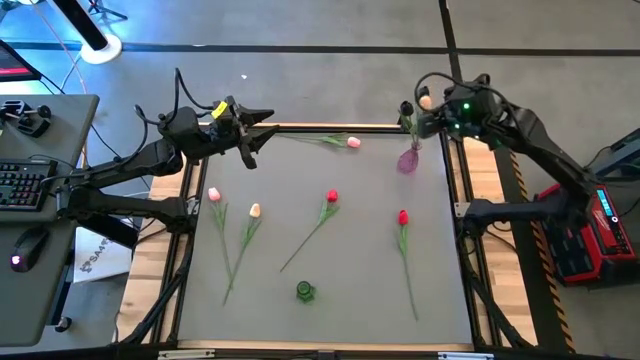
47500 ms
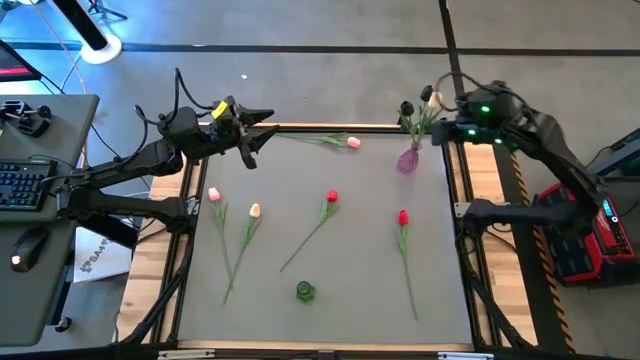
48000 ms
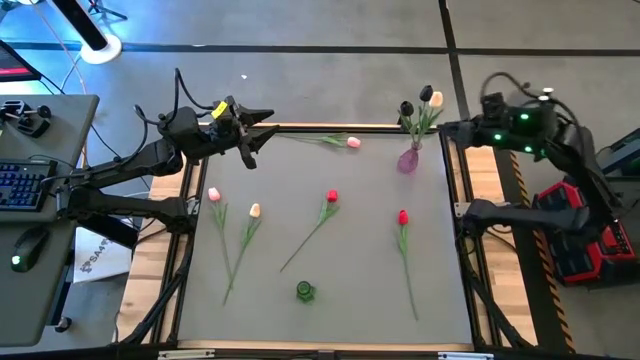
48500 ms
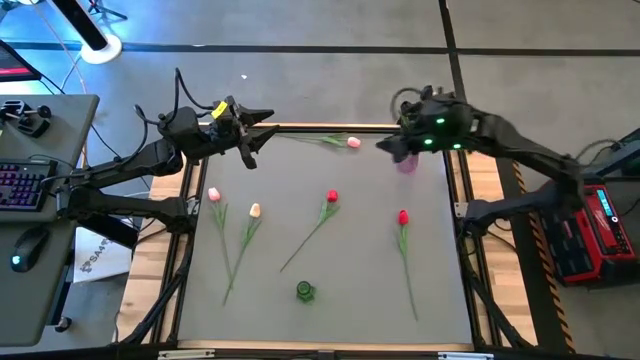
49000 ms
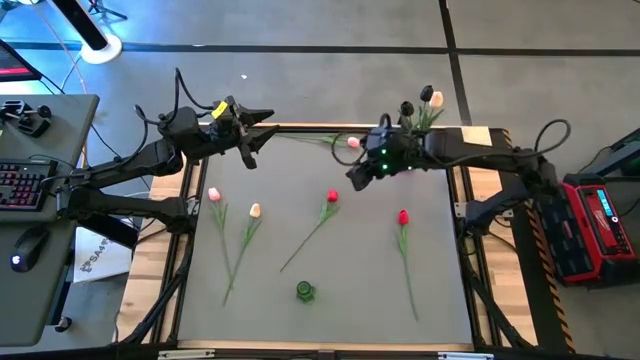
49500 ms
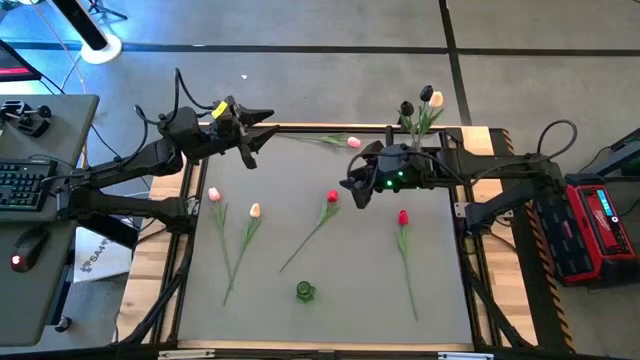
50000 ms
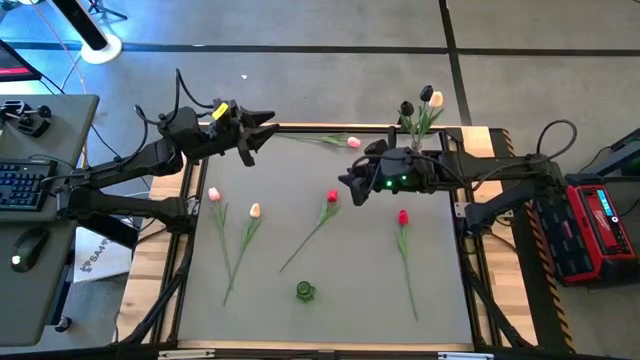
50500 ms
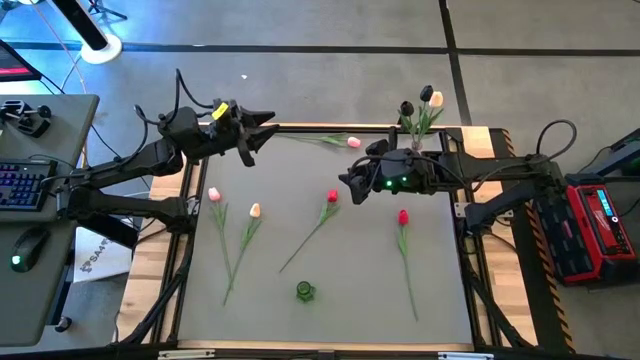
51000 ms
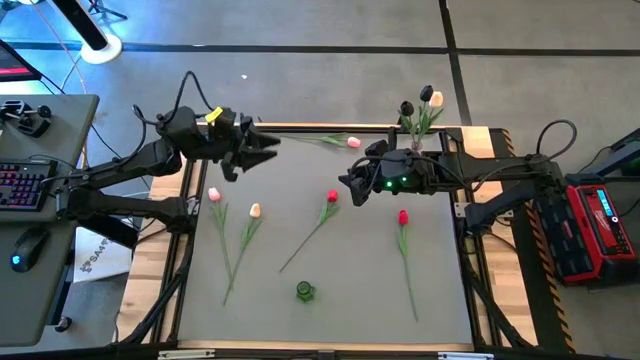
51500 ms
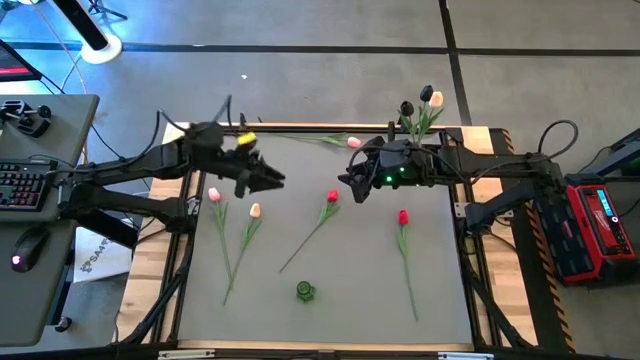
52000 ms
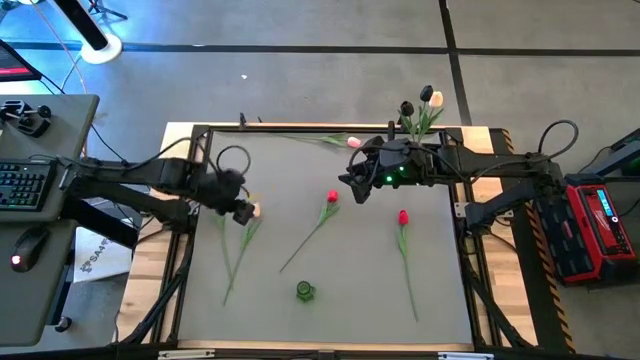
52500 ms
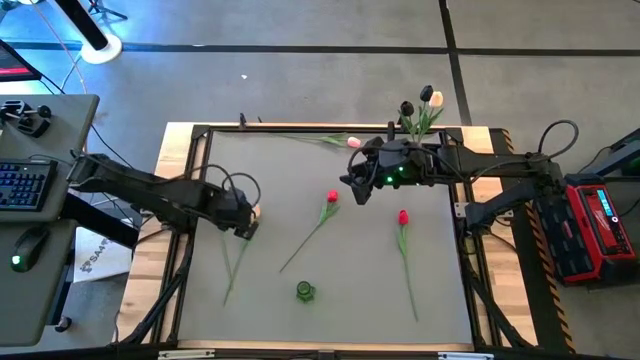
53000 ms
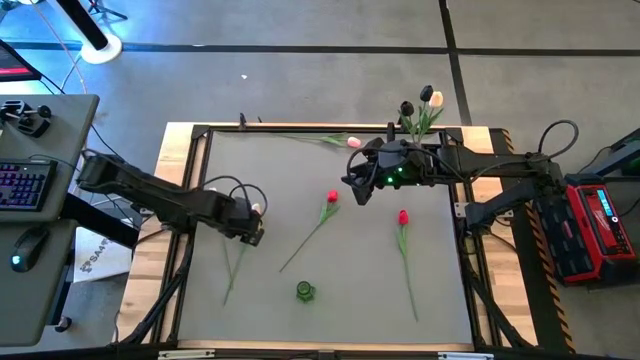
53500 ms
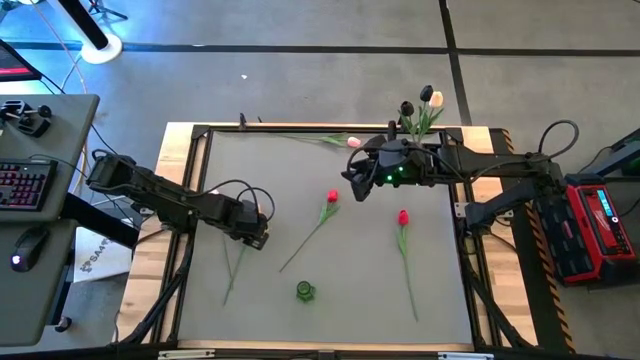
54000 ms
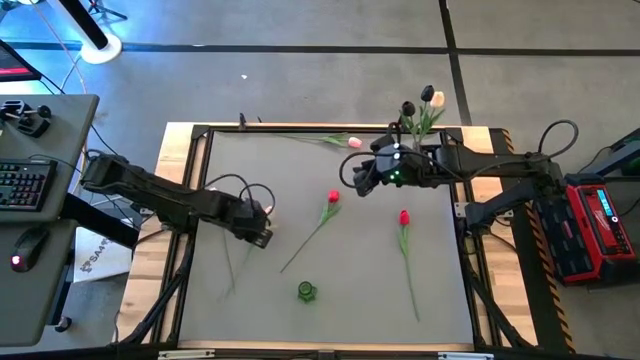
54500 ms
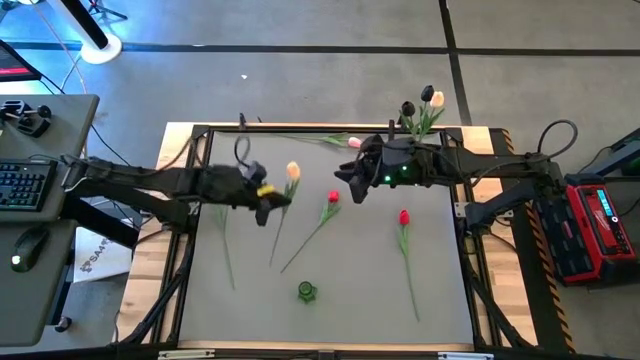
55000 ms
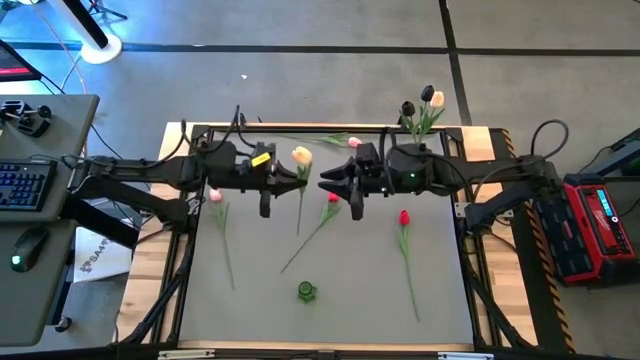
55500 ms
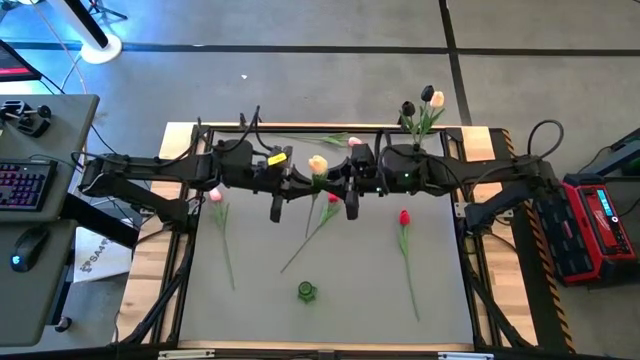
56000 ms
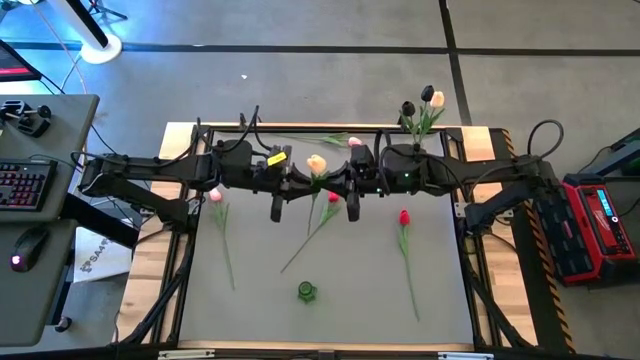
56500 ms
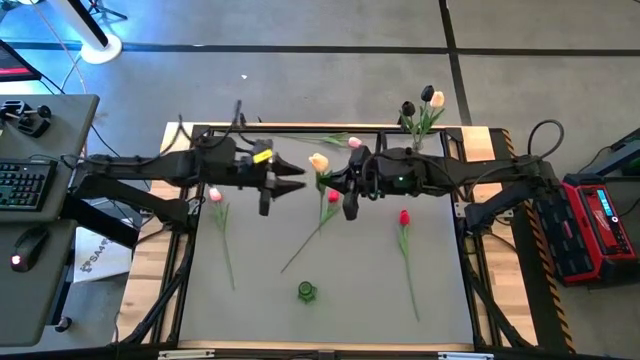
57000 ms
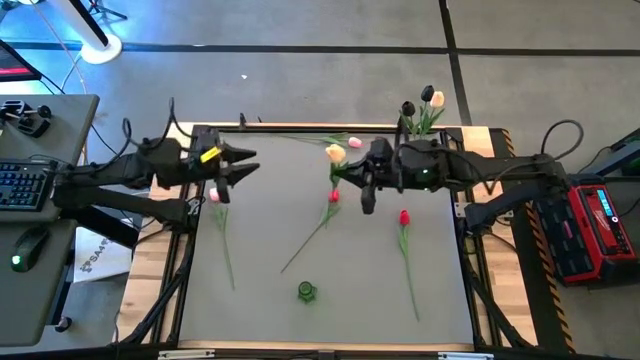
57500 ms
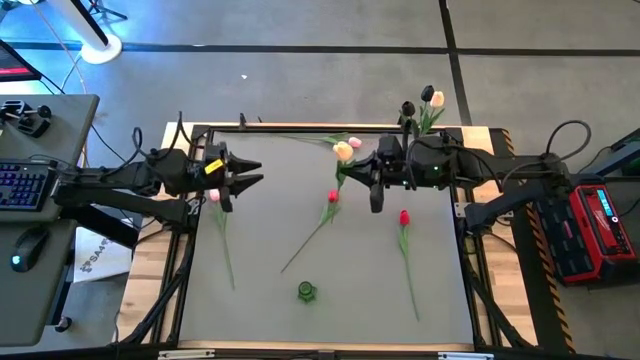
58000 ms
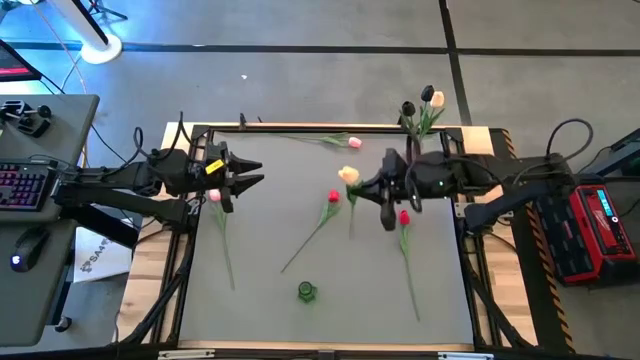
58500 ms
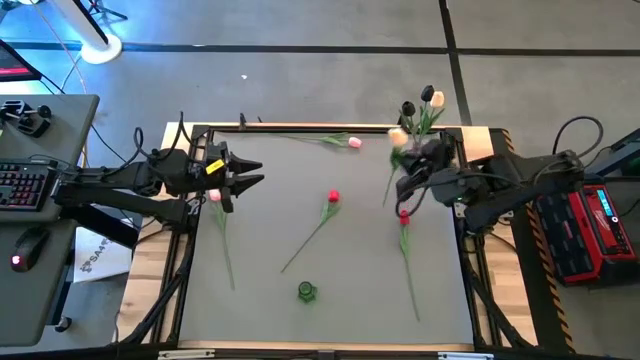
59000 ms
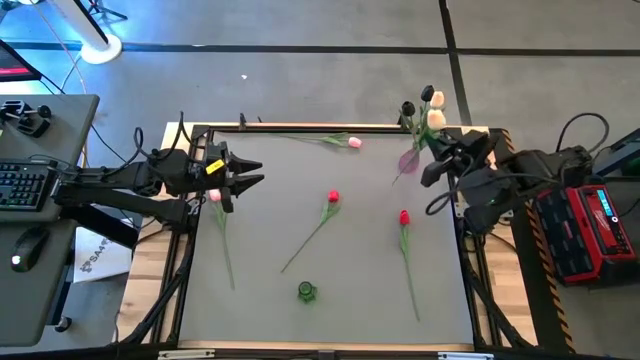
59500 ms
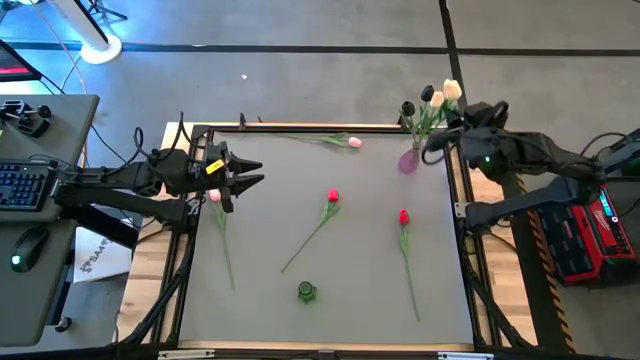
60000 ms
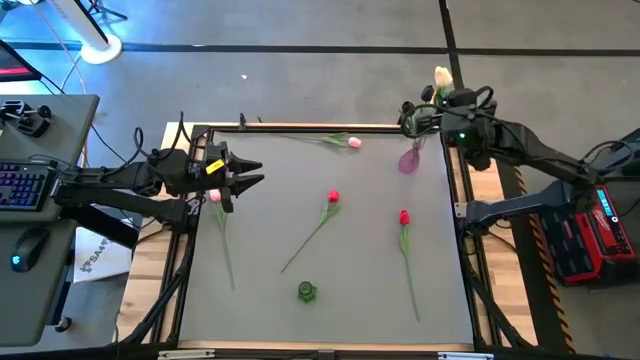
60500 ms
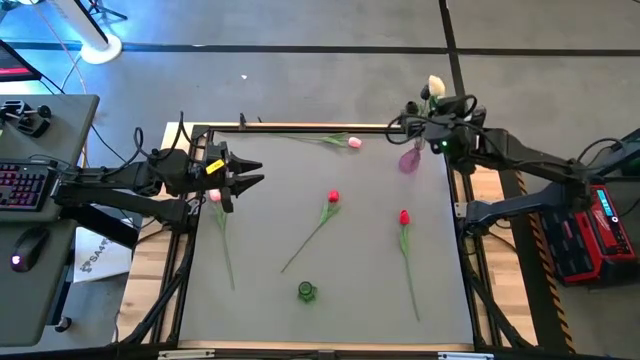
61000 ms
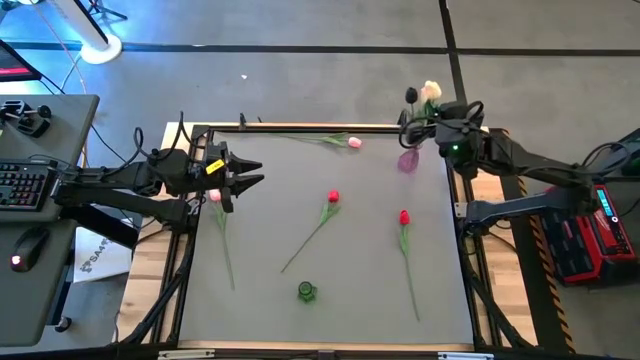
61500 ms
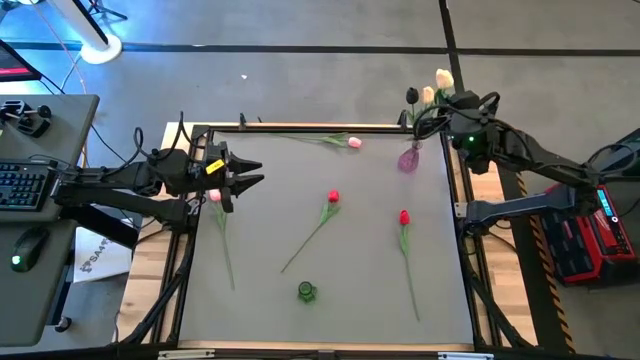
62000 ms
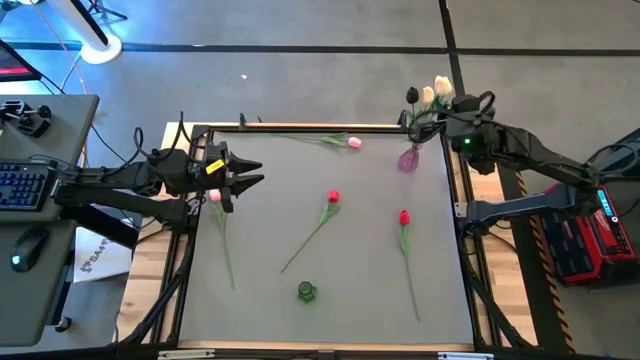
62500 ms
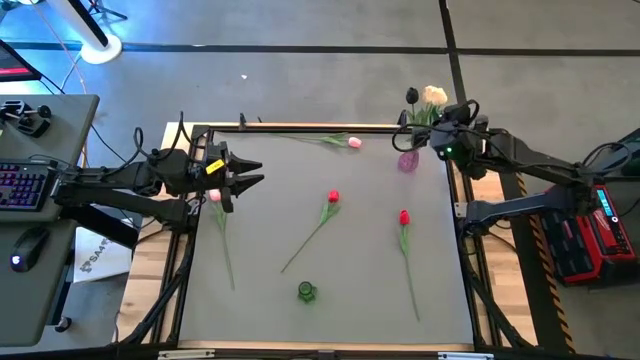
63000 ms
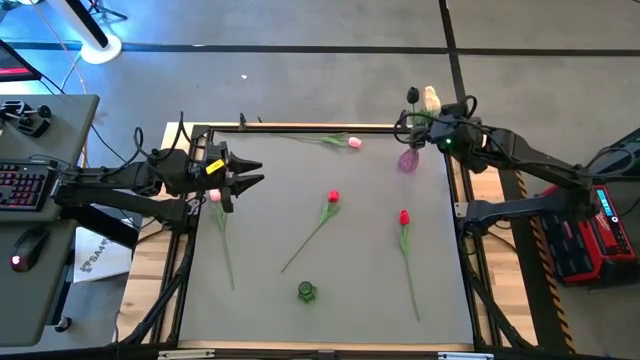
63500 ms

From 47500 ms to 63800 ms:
Task: Sort flowers into vase by color
Put the white flower into the violet vase
